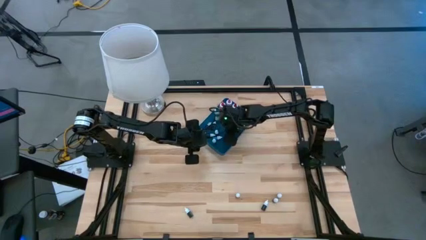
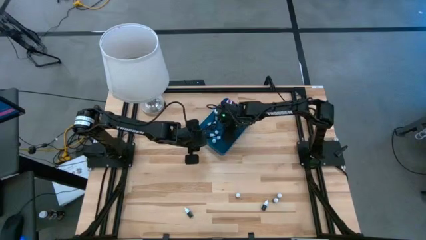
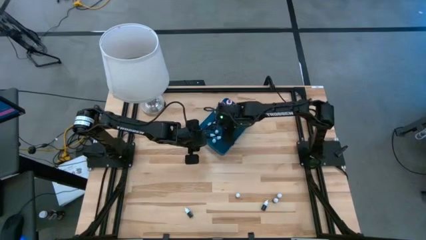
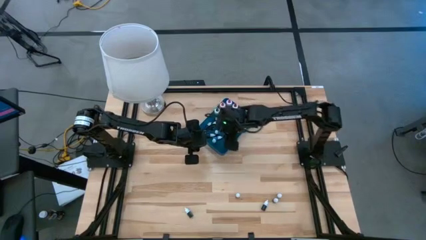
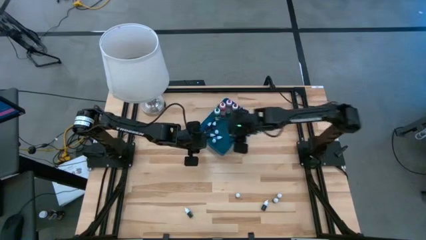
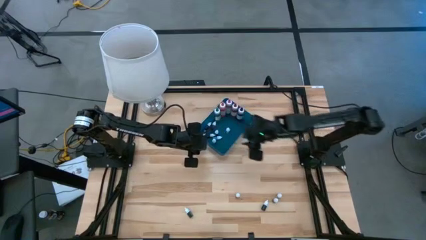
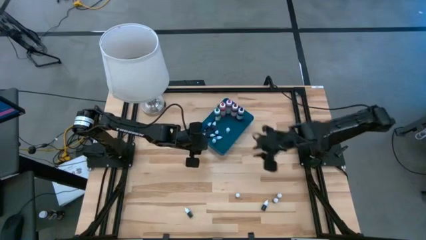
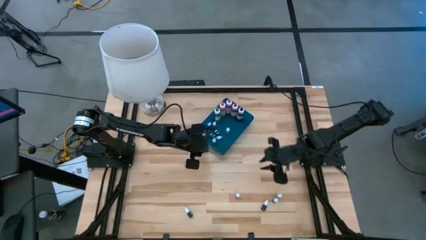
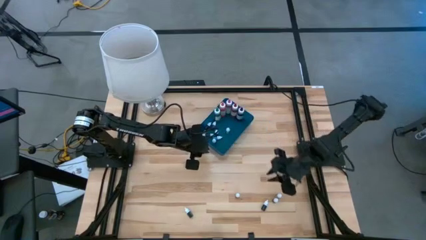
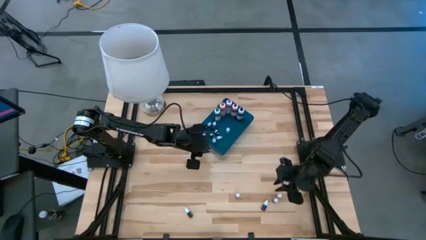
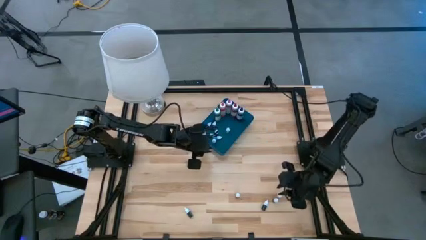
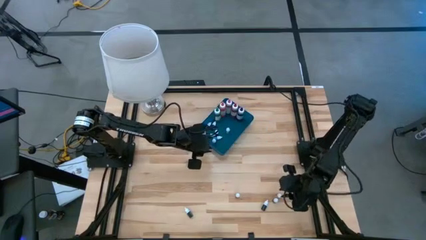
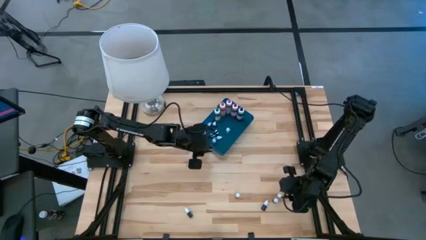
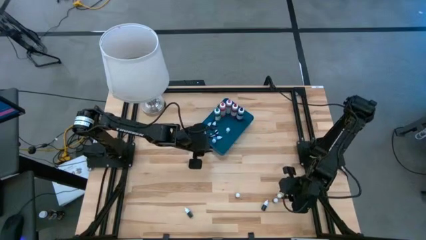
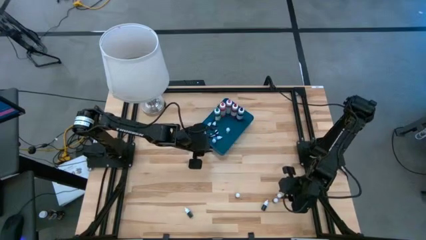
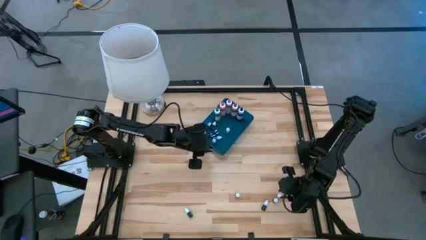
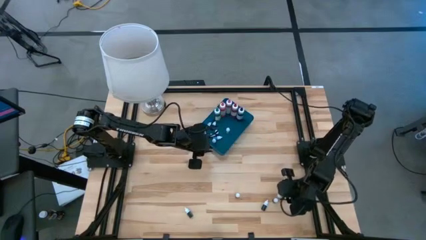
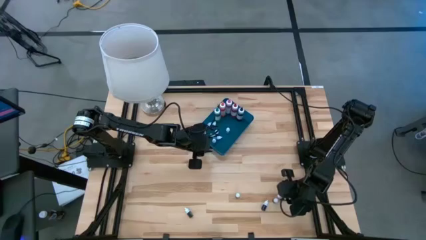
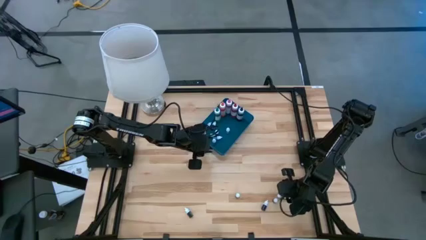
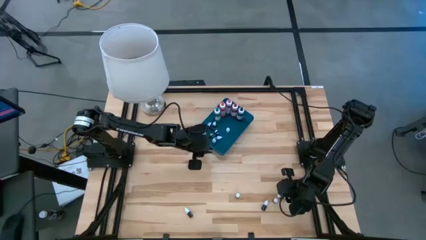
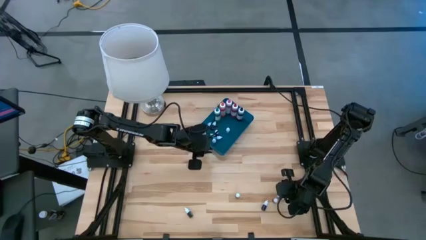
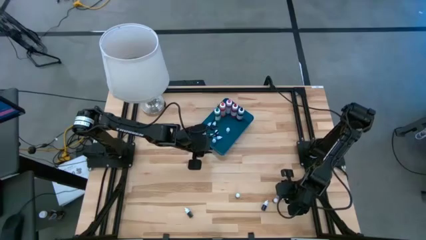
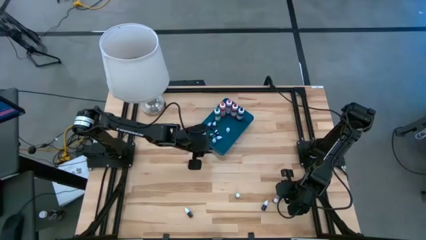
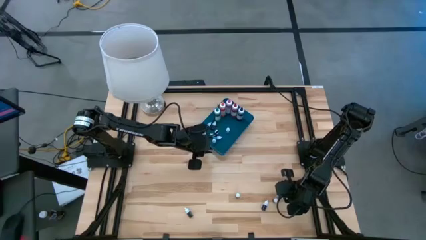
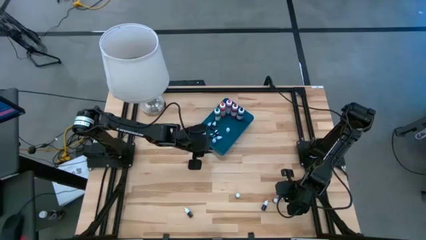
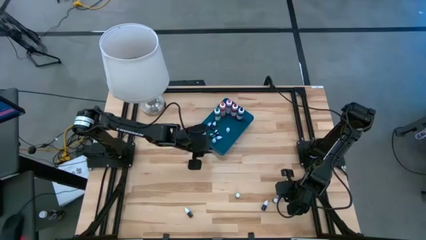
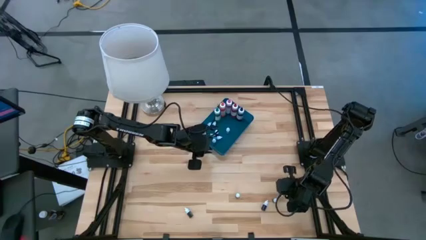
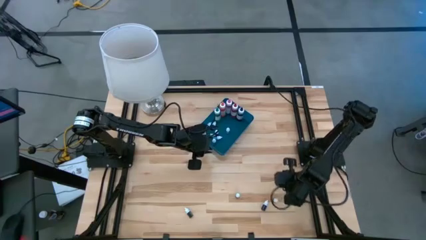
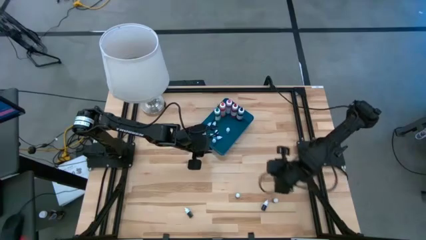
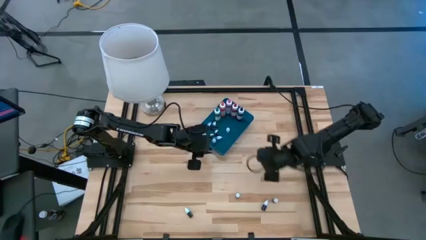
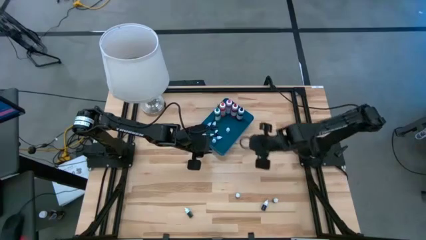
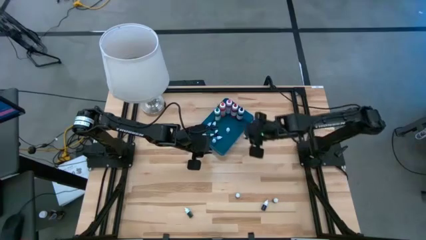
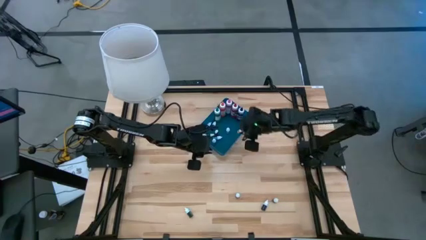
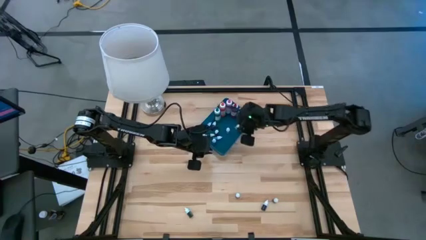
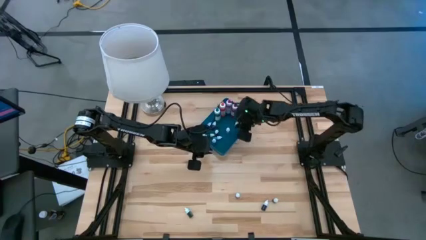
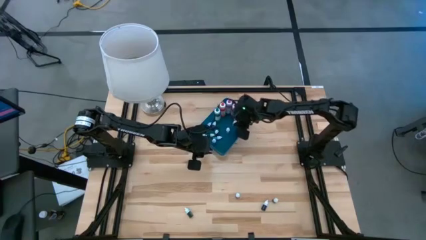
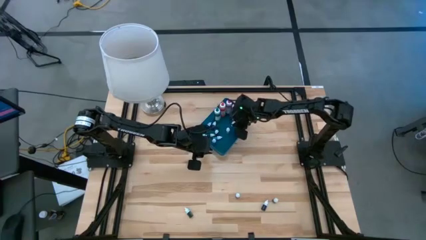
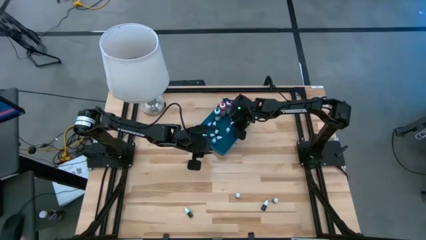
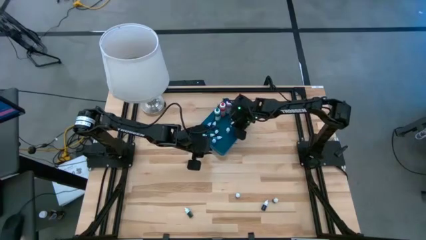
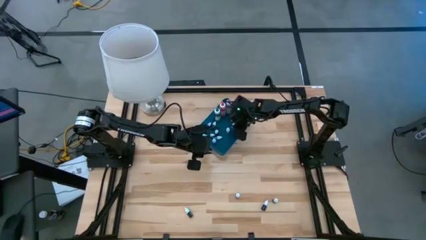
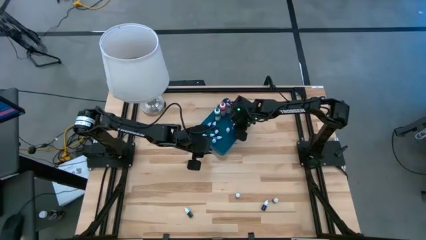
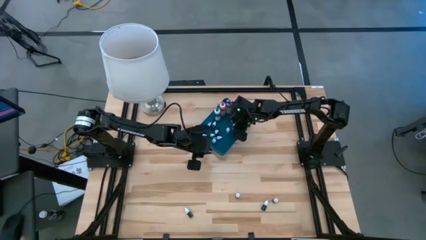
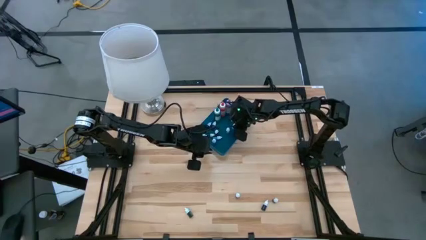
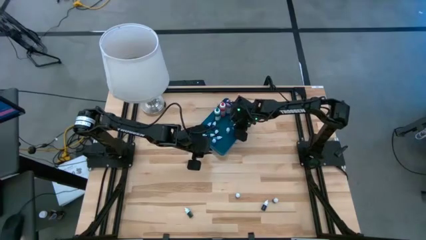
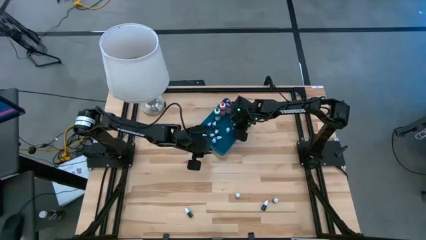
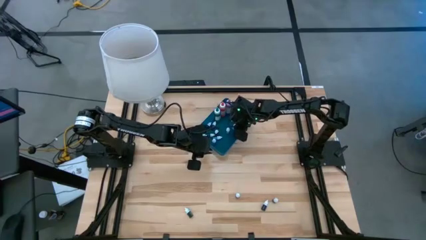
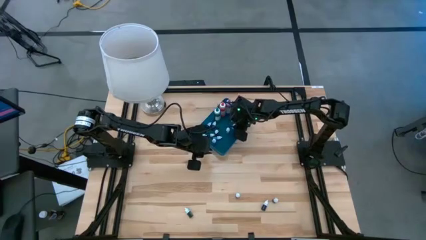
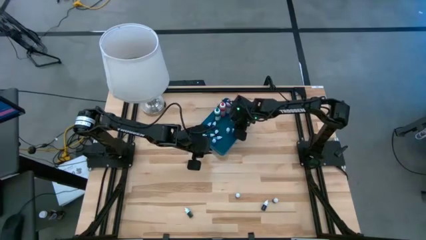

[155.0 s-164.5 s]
Task: Pick & Place food coloring
Put the small orange food coloring bottle into the blue container

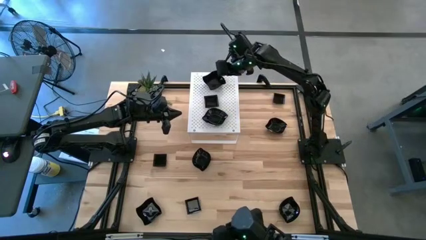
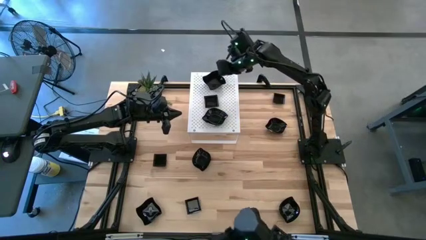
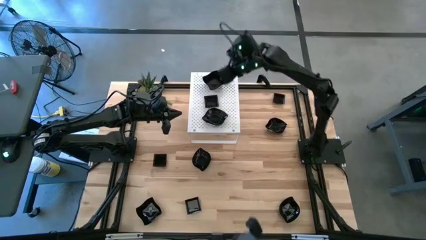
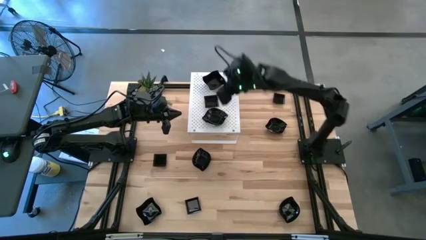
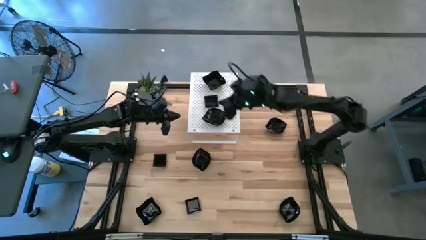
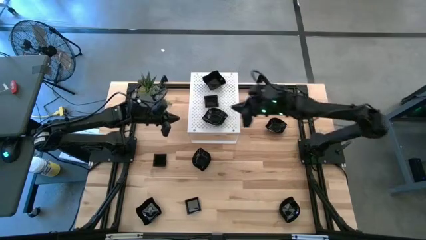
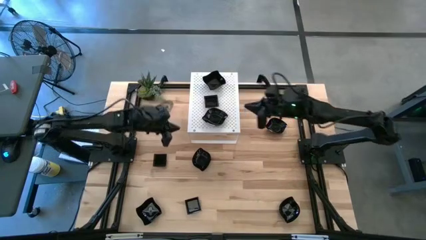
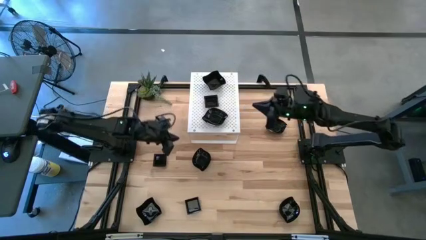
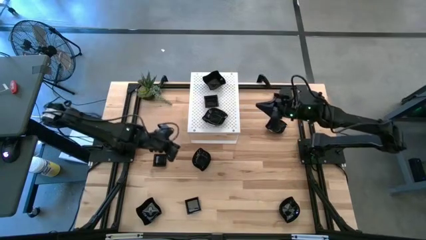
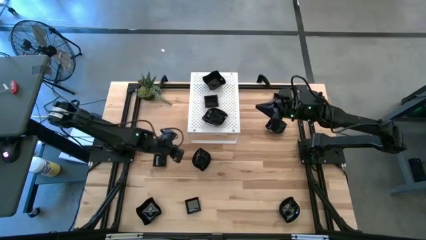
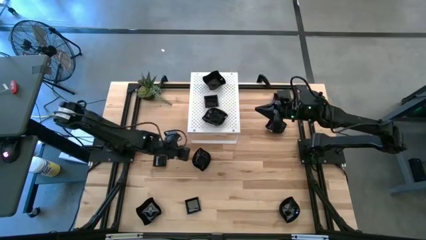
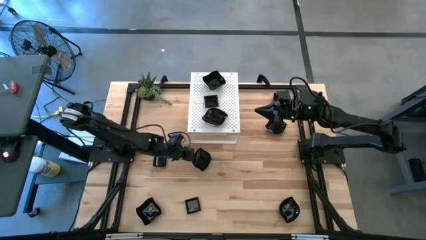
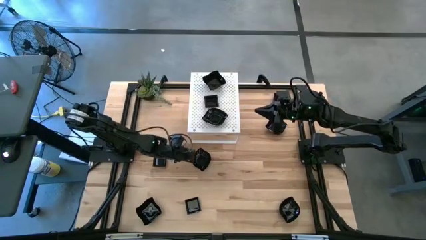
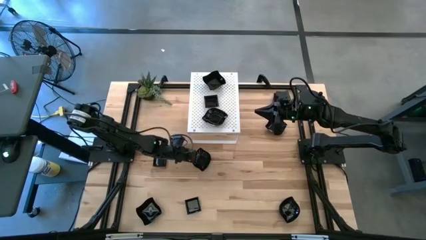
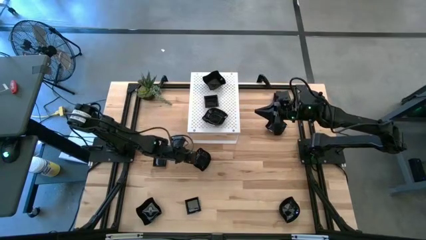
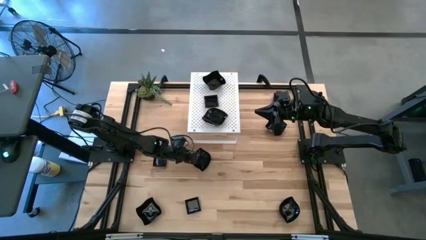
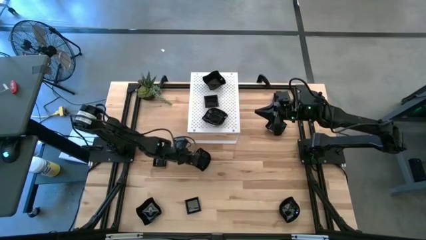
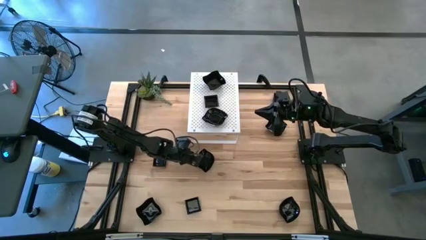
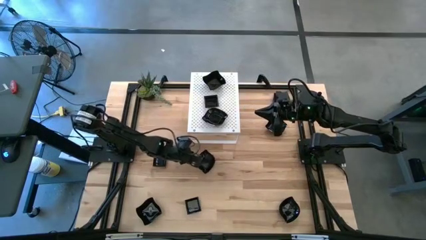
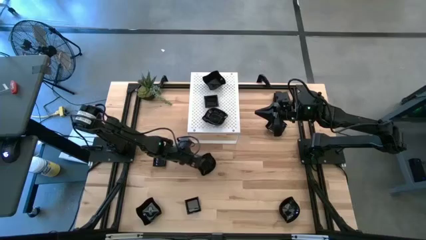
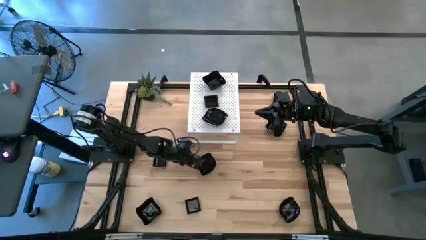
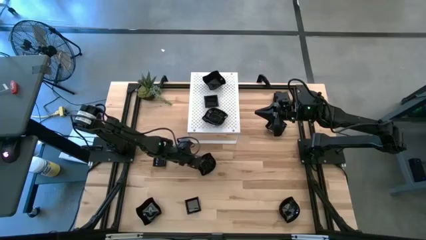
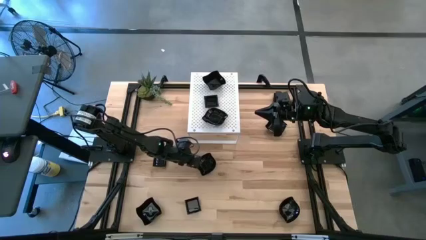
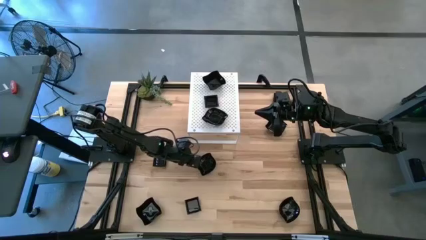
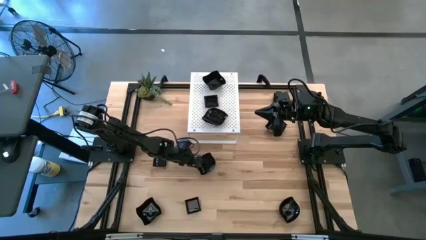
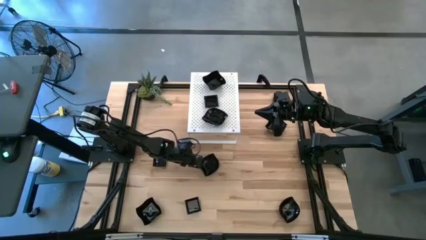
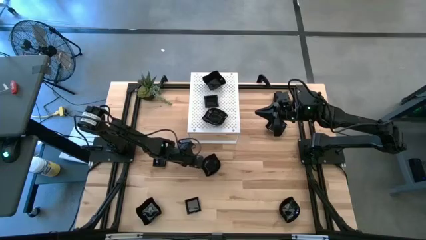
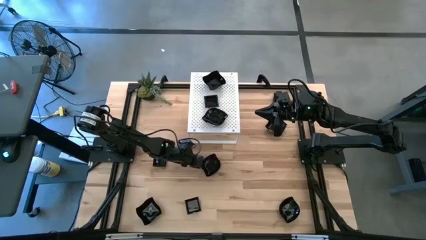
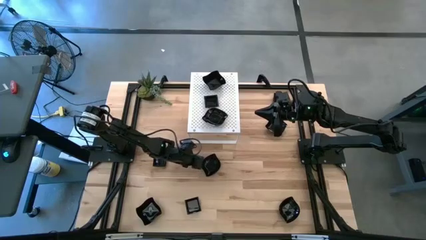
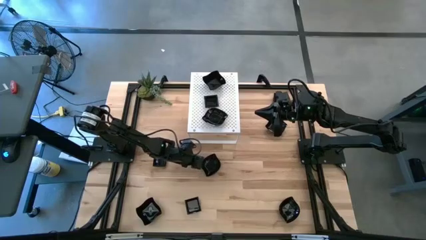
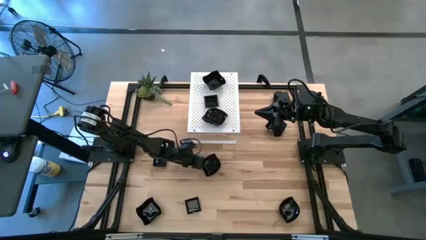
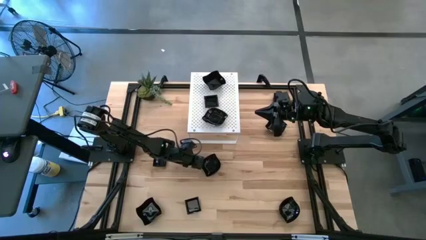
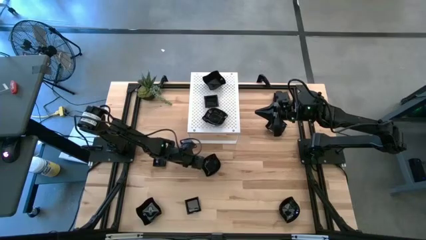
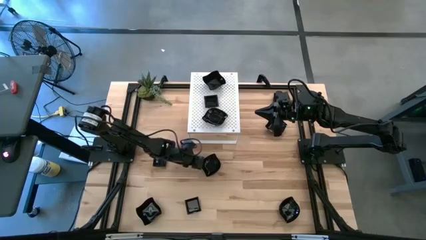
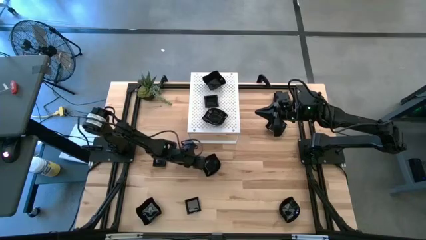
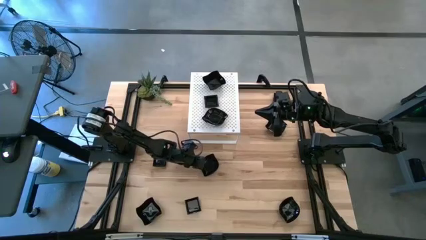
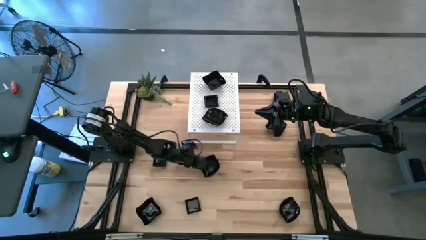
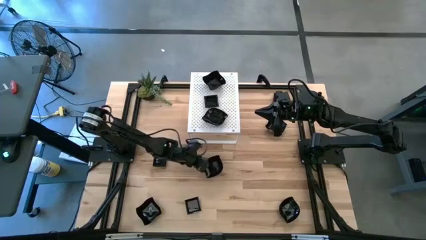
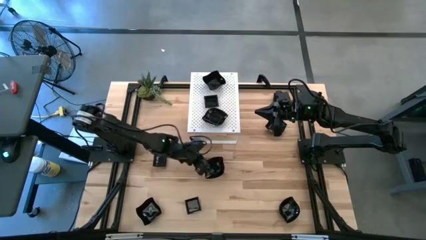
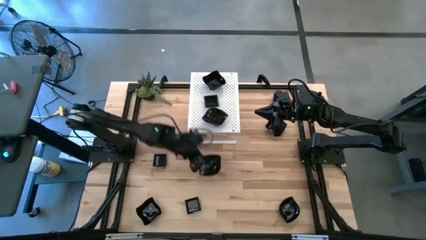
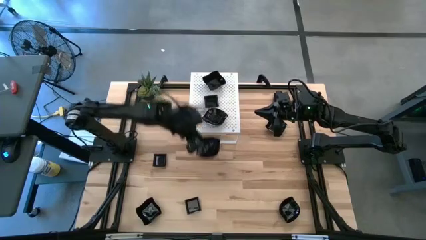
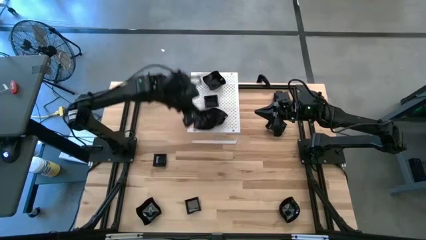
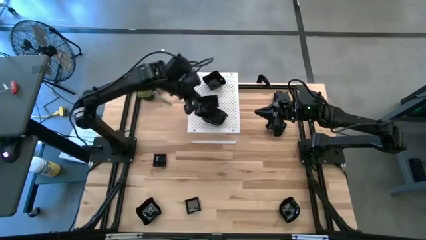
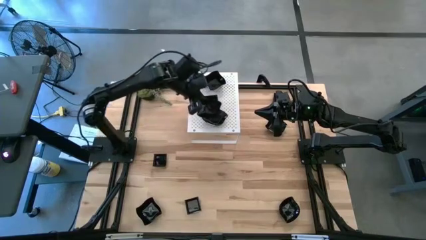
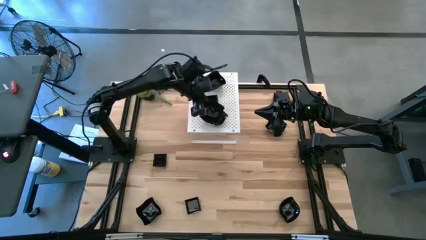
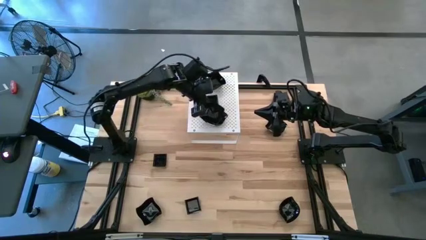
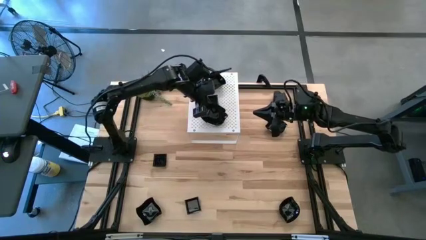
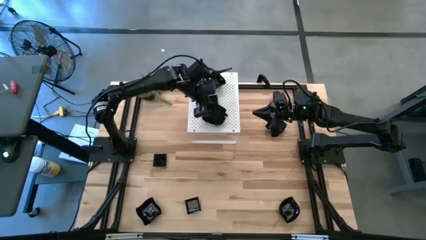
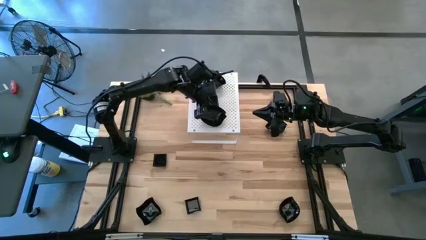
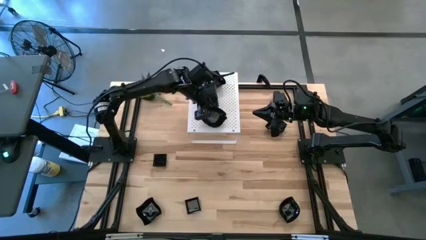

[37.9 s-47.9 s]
Task: Pick & Place Mini shaped plates
Stack the black leaf-shaped plate on top of the black leaf-shaped plate on the shelf
